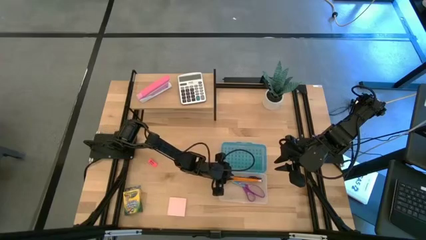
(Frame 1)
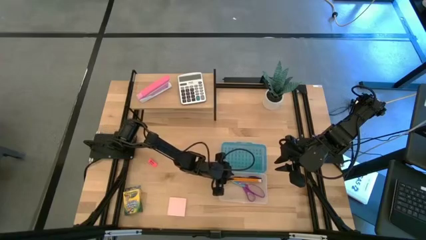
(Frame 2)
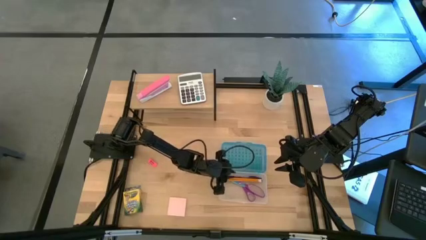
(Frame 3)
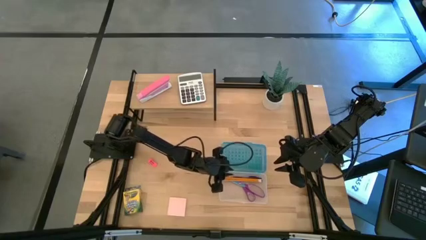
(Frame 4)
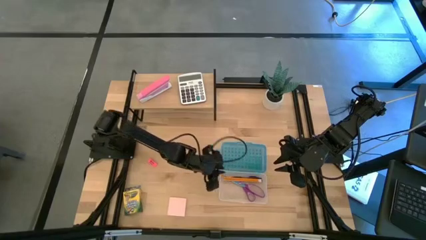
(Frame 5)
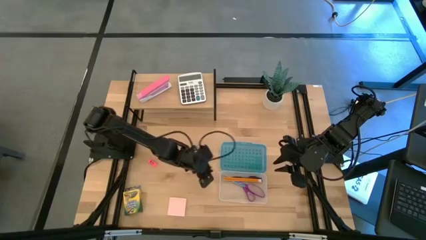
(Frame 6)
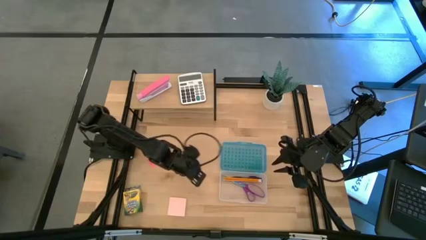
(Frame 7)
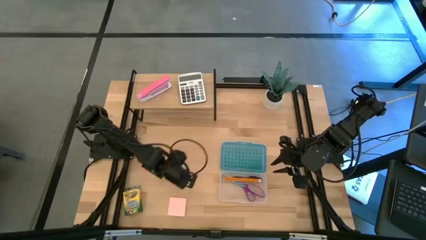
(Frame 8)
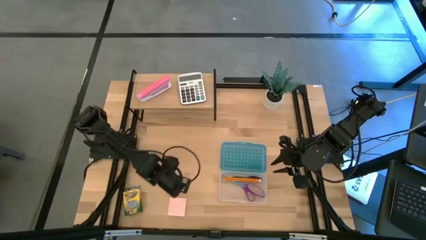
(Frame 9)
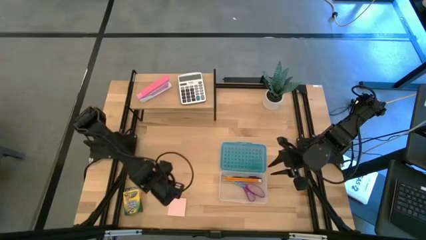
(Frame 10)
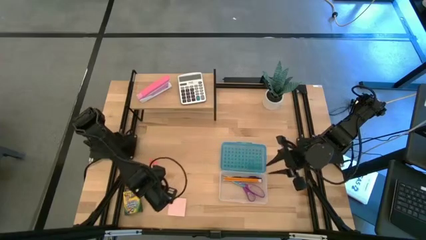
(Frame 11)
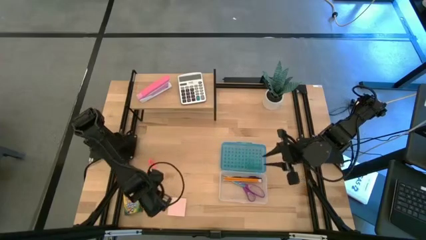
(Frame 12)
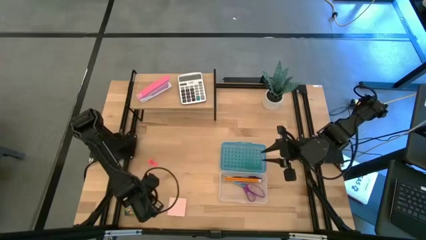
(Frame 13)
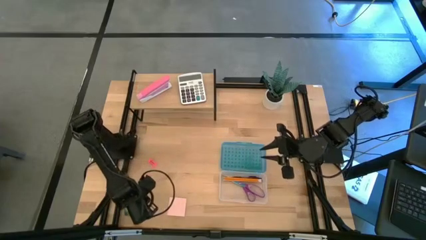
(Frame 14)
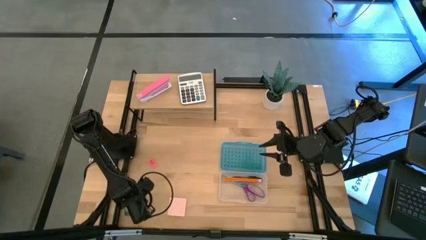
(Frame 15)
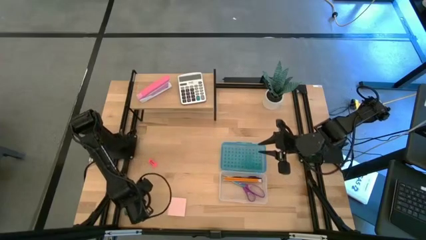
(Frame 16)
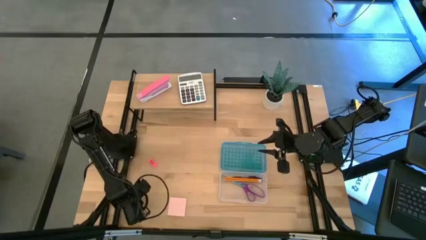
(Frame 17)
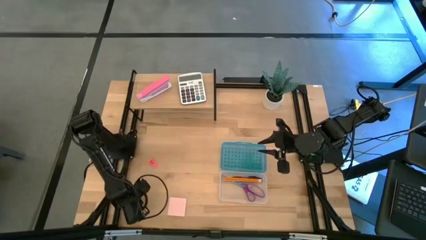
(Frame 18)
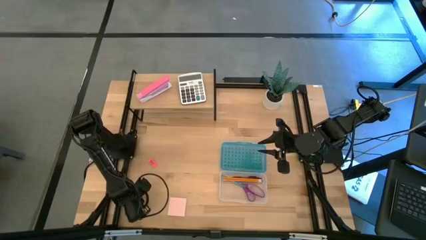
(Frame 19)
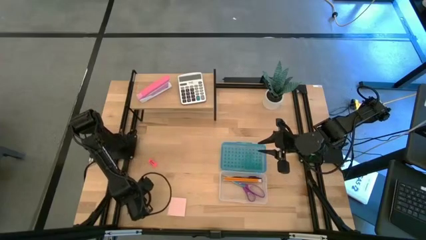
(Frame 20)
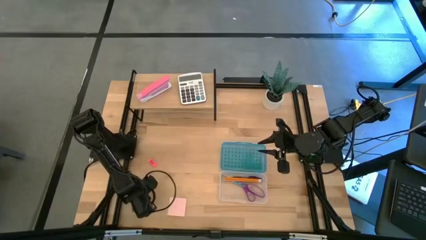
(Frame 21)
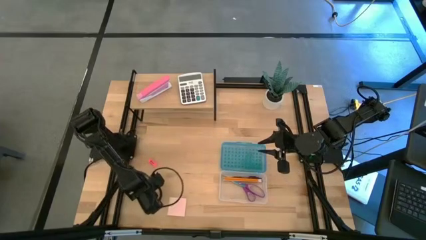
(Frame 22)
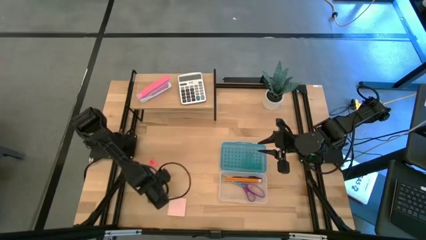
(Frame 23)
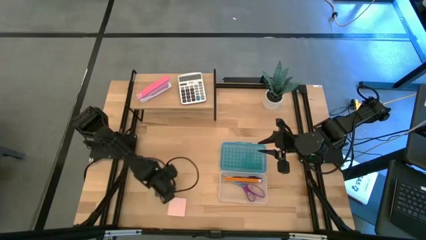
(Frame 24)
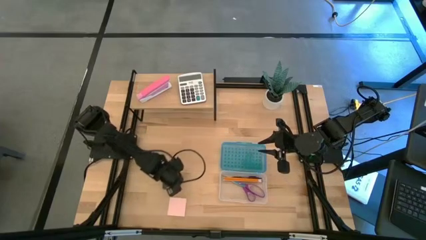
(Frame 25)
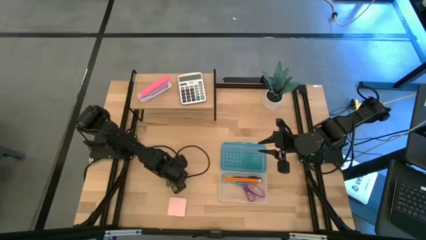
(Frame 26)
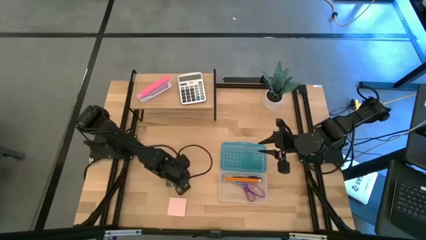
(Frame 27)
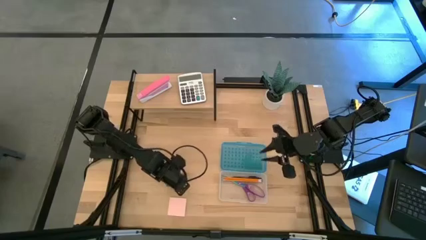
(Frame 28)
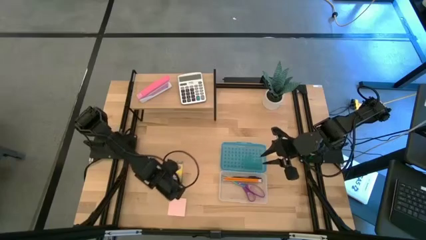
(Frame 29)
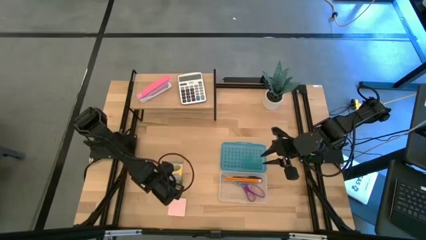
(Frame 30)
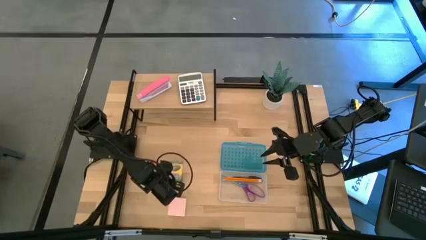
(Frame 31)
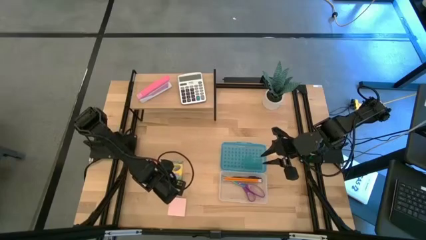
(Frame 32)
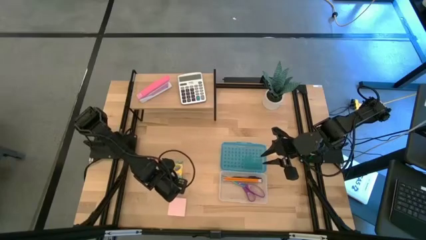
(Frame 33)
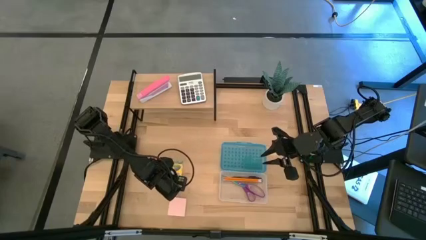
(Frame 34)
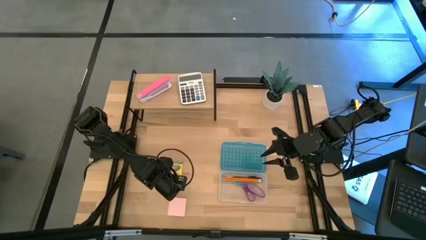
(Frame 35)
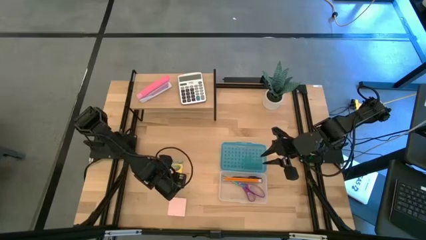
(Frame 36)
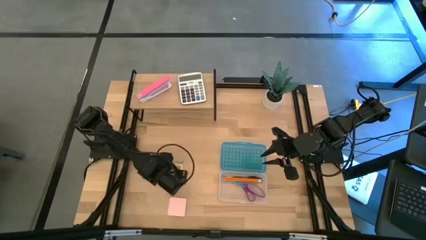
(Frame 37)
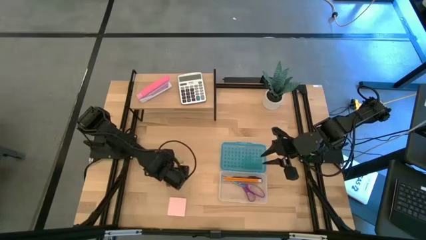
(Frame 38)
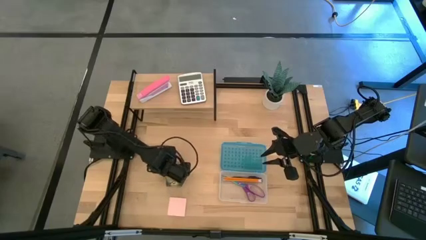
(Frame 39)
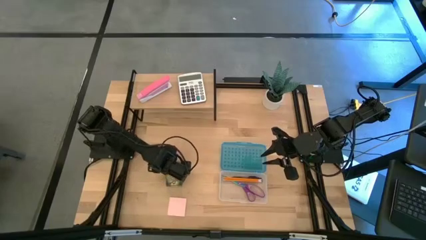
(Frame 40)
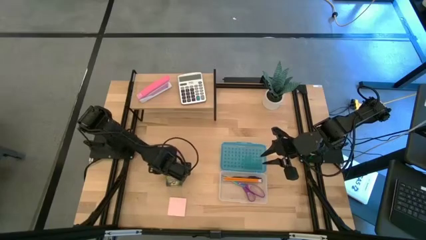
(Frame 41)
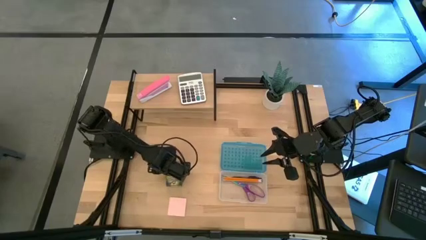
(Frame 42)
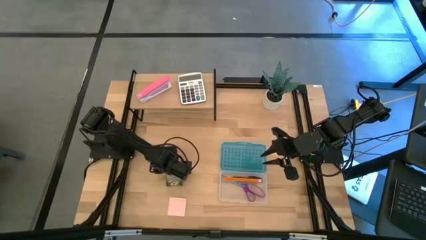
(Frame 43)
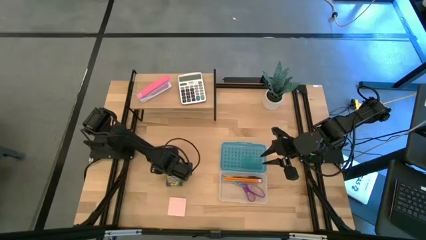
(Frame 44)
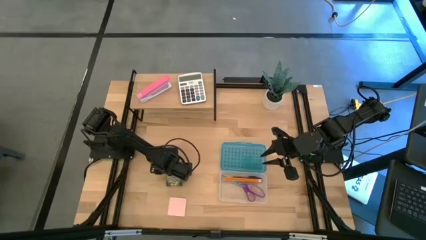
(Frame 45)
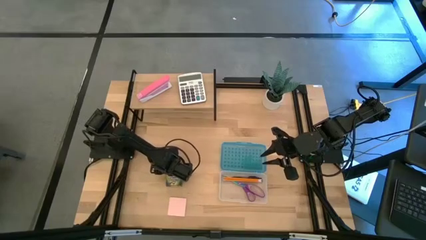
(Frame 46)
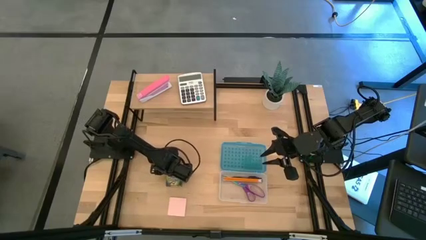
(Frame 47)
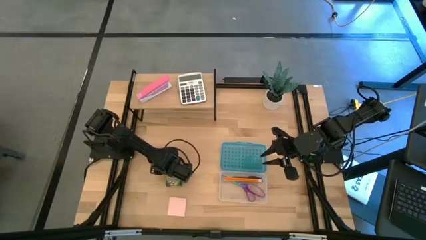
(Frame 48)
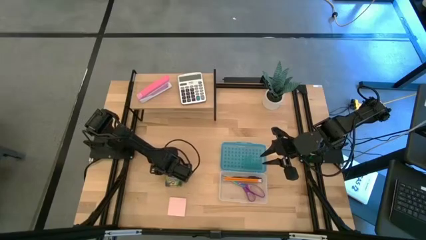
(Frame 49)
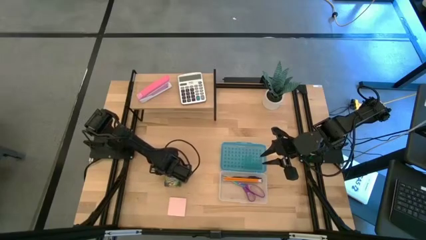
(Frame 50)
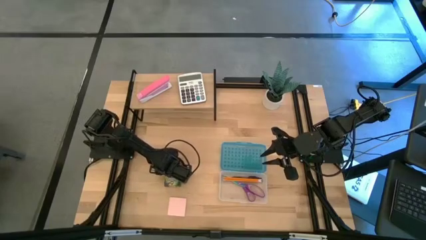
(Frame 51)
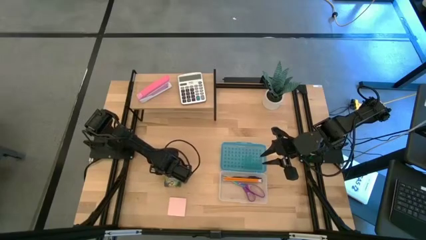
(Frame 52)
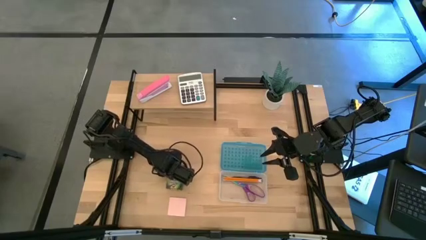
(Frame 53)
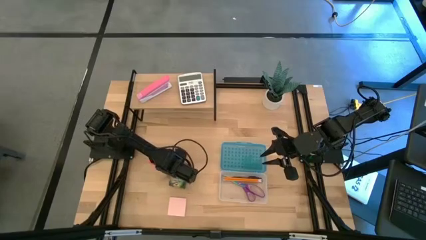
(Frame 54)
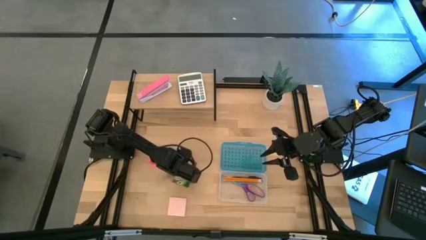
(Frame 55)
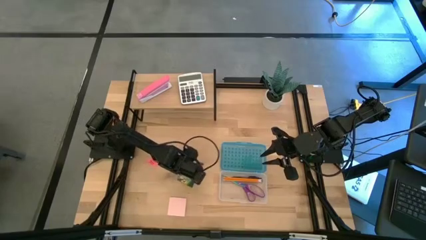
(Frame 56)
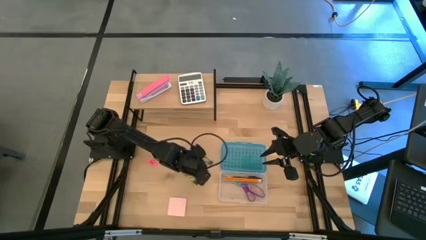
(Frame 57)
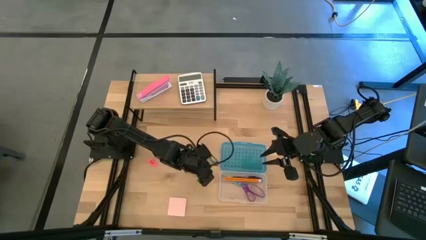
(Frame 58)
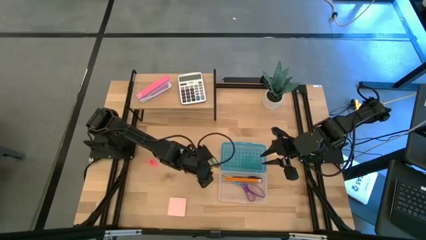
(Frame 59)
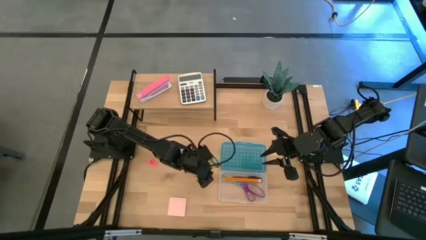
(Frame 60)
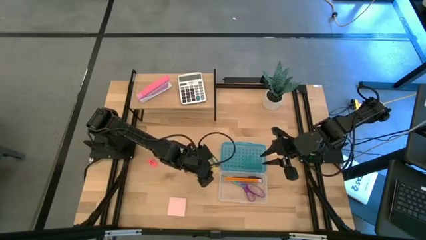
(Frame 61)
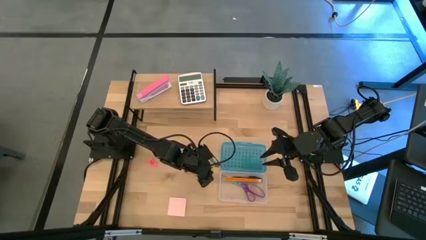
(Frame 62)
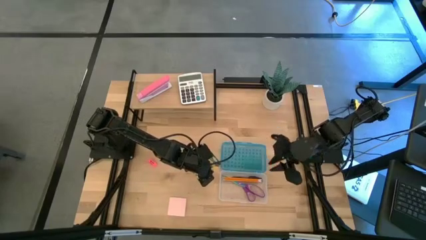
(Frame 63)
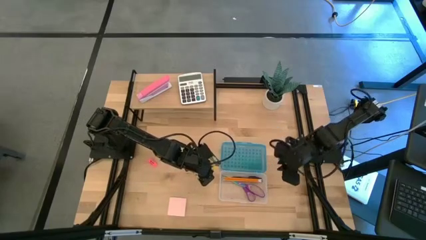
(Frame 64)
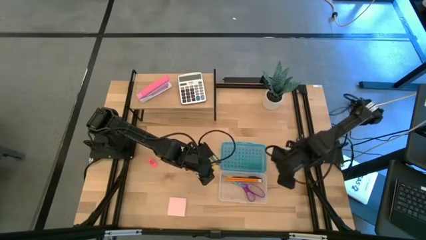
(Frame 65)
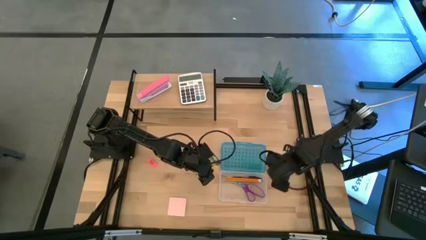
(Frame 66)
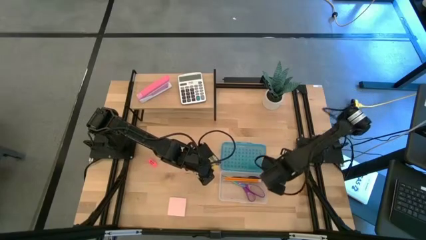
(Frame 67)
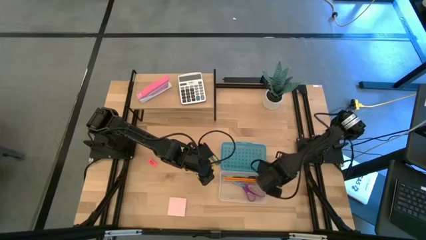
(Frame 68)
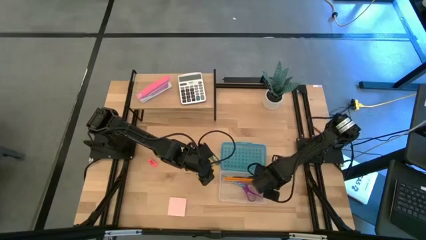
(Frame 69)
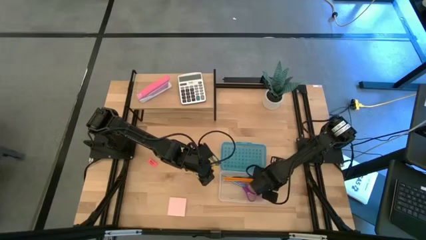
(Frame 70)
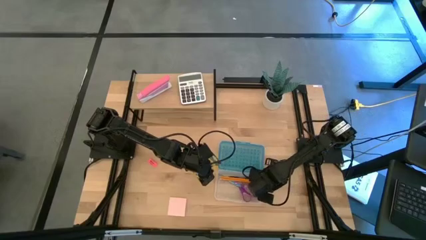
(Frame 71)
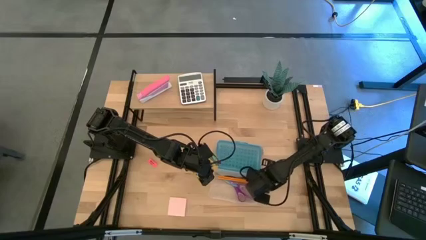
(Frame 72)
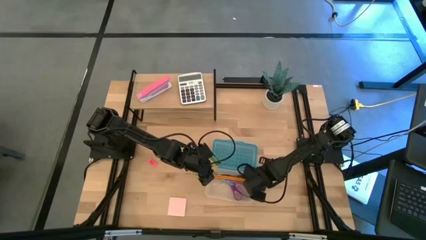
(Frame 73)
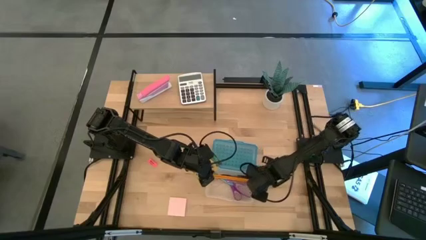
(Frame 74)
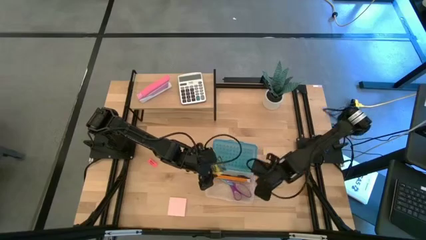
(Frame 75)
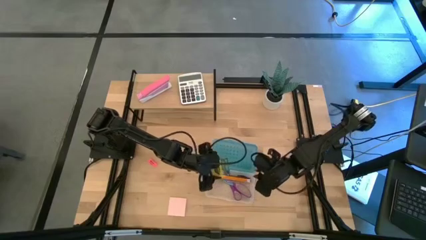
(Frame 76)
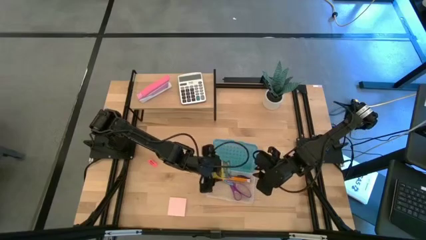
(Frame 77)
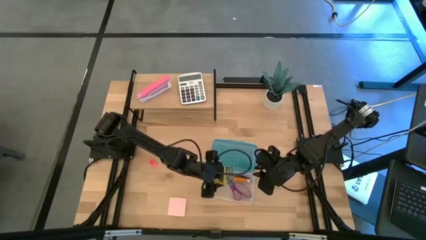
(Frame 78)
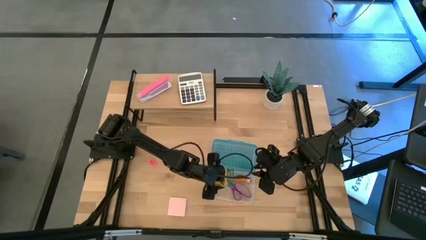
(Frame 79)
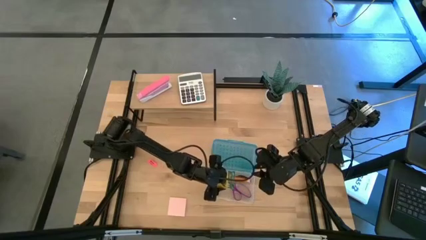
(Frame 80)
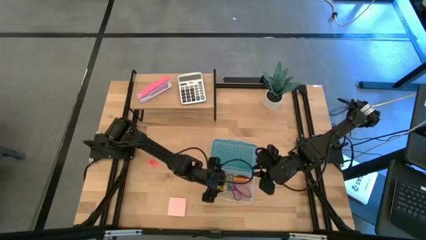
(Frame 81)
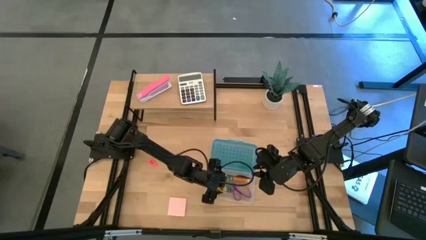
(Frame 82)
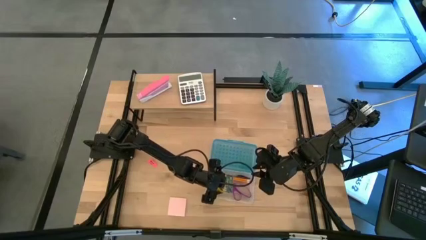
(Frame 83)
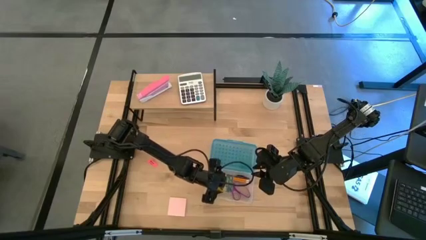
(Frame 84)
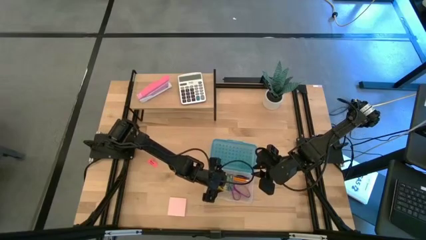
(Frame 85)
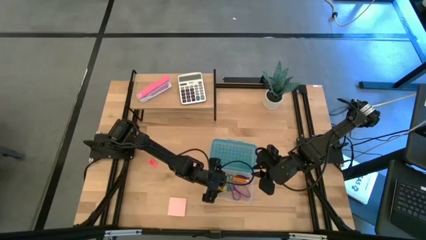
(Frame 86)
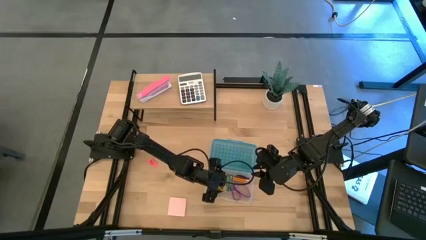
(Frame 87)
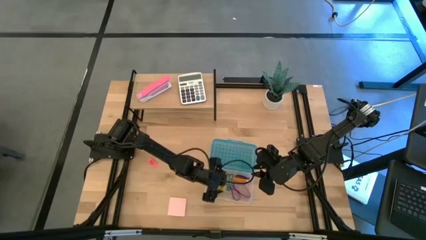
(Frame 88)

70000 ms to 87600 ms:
Task: Pack school essentials
Put the yellow crayon box into the blue supply box
